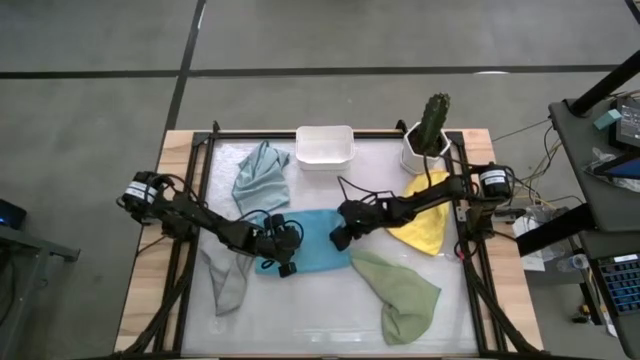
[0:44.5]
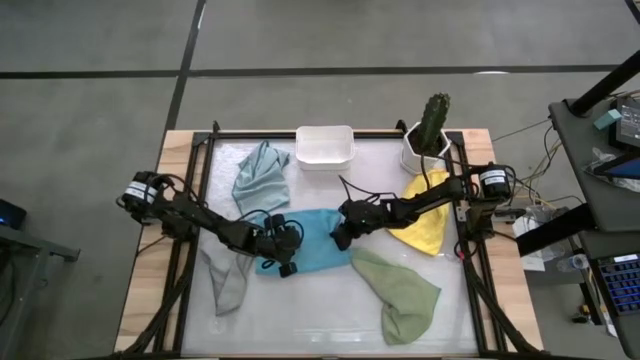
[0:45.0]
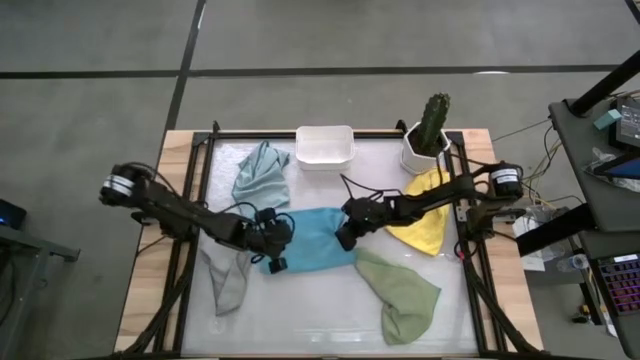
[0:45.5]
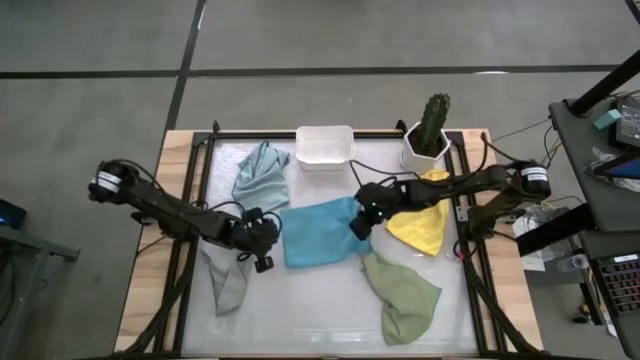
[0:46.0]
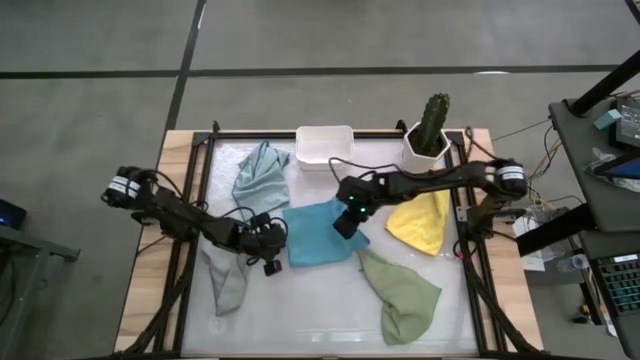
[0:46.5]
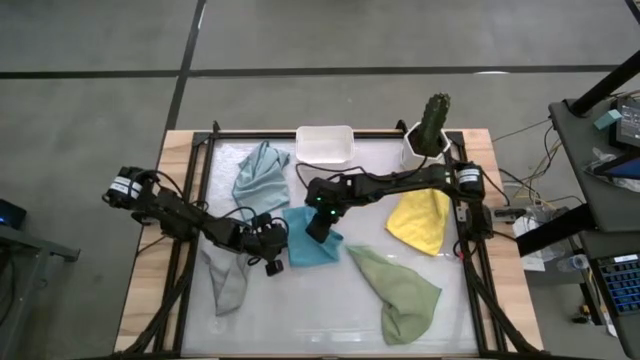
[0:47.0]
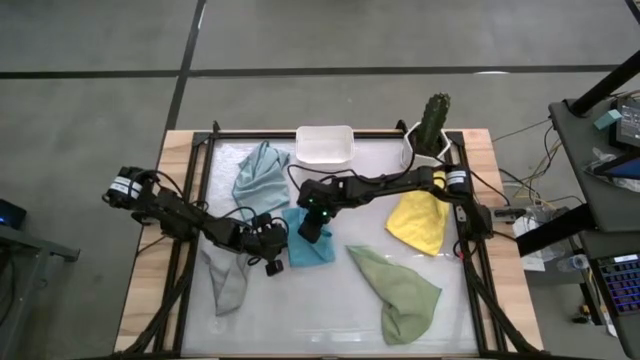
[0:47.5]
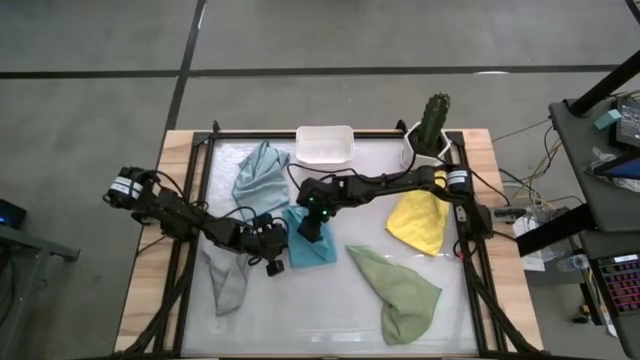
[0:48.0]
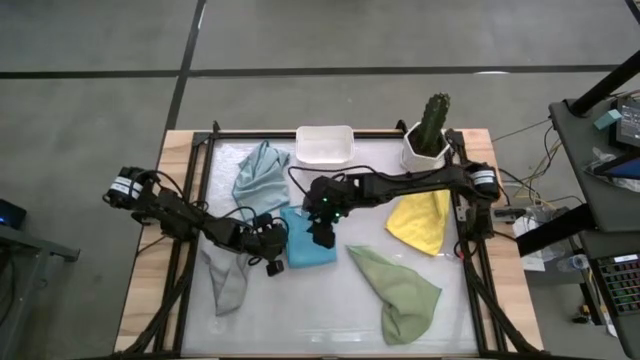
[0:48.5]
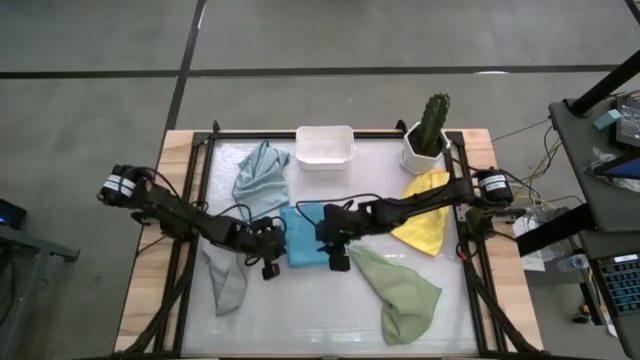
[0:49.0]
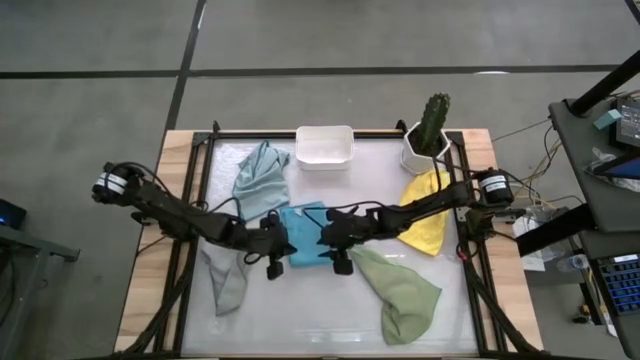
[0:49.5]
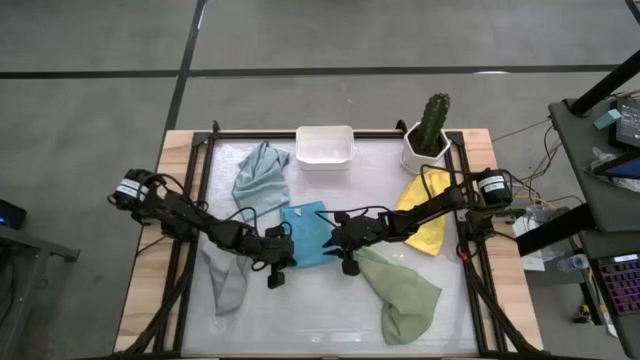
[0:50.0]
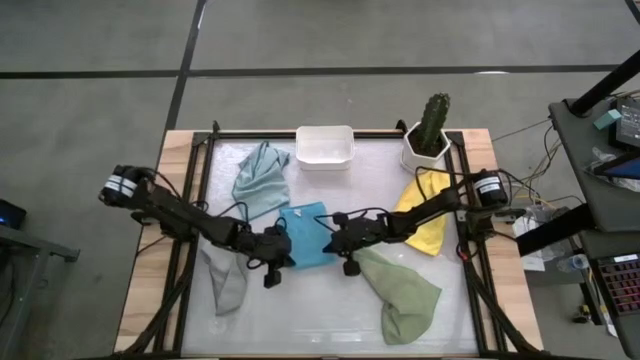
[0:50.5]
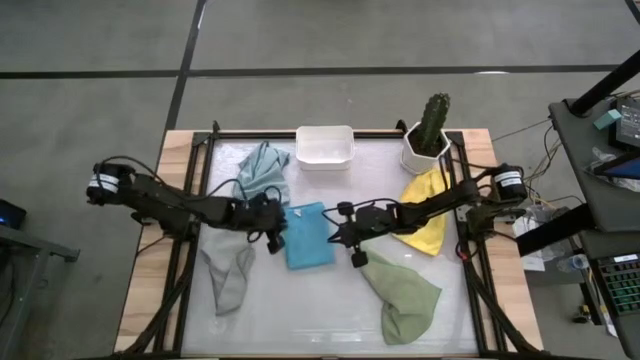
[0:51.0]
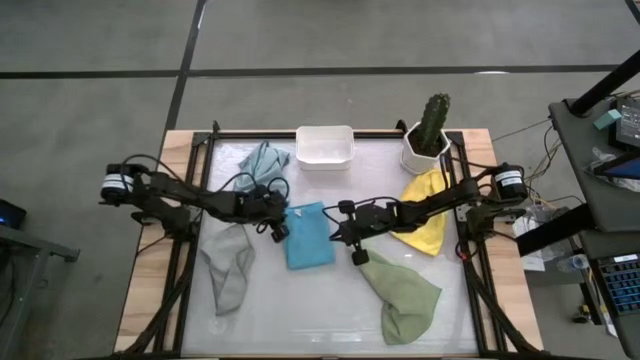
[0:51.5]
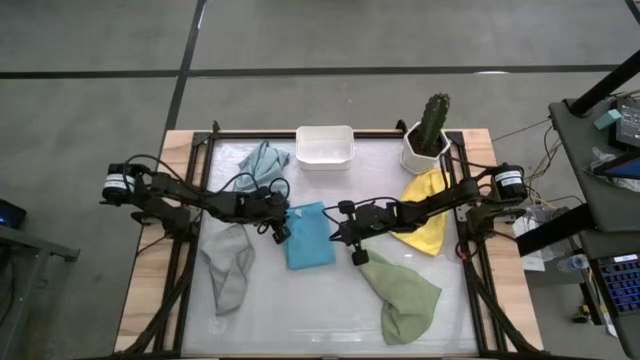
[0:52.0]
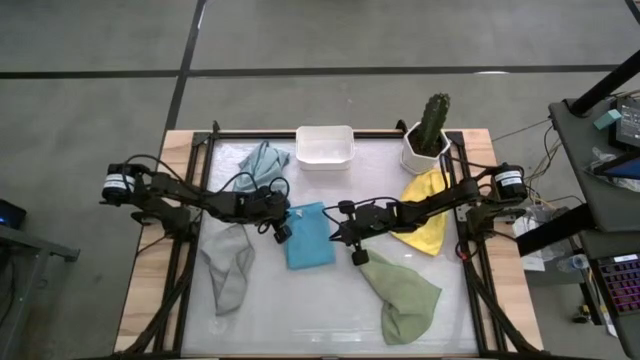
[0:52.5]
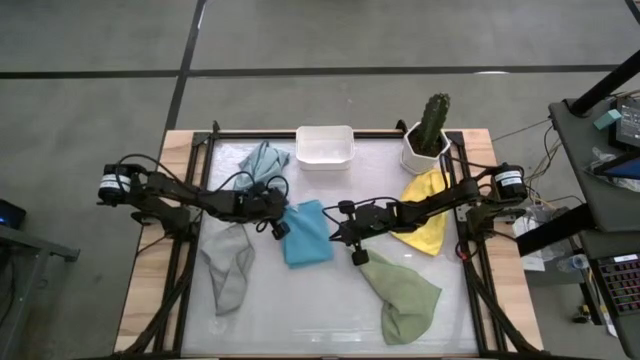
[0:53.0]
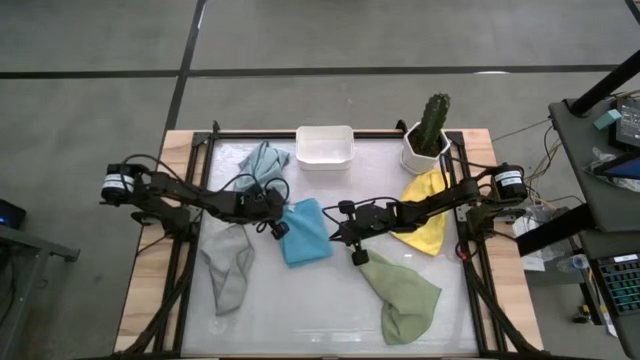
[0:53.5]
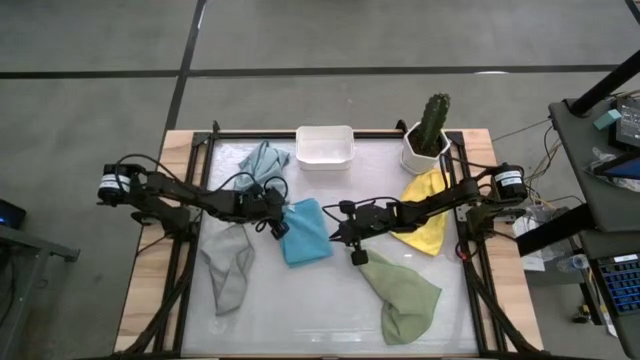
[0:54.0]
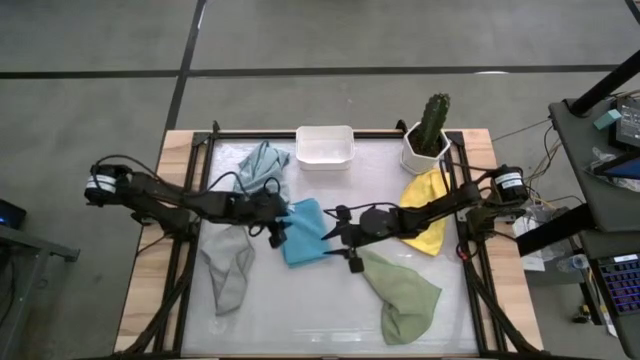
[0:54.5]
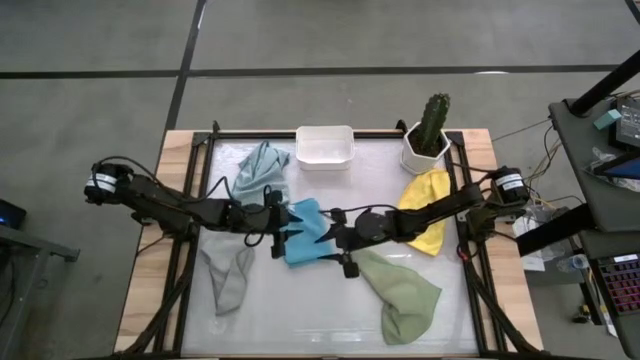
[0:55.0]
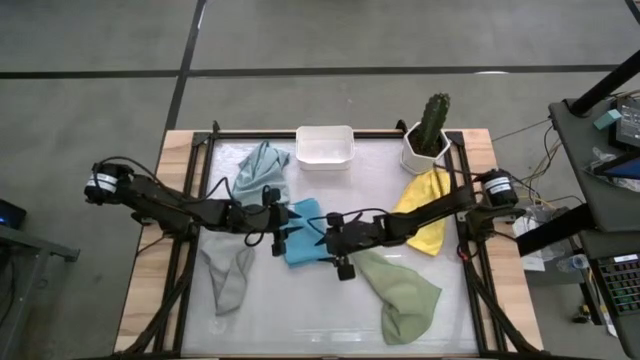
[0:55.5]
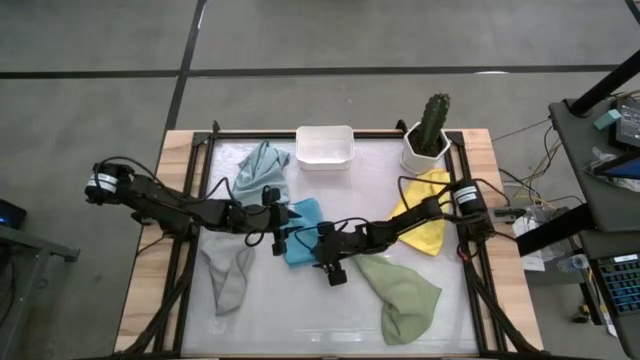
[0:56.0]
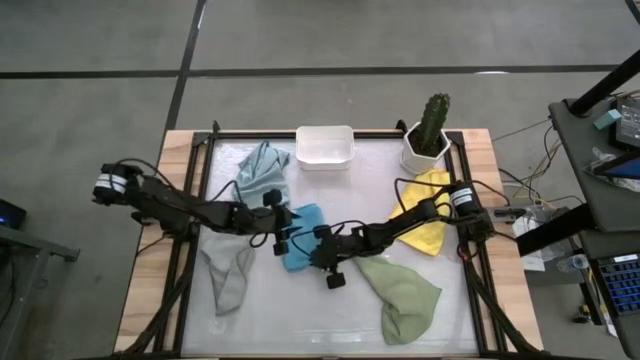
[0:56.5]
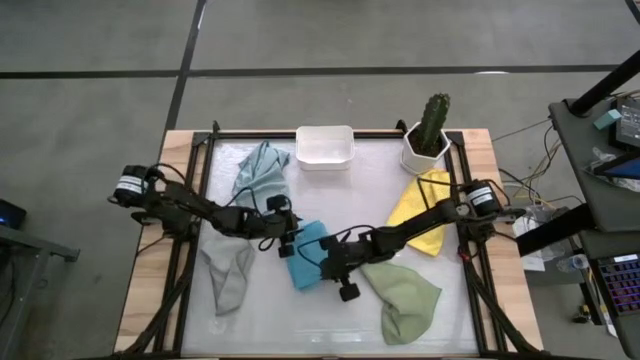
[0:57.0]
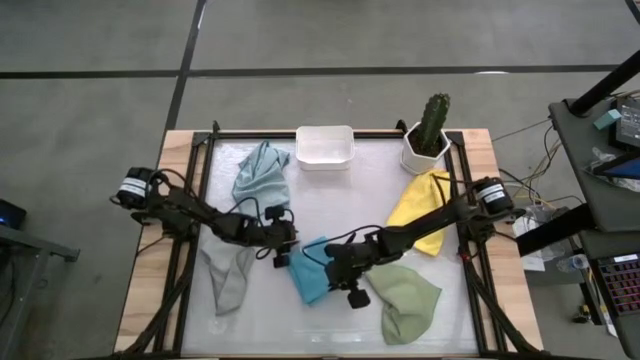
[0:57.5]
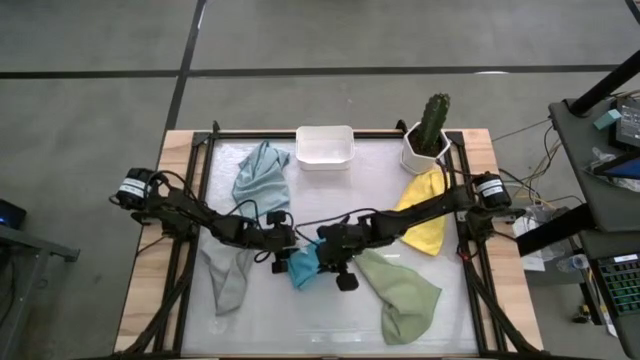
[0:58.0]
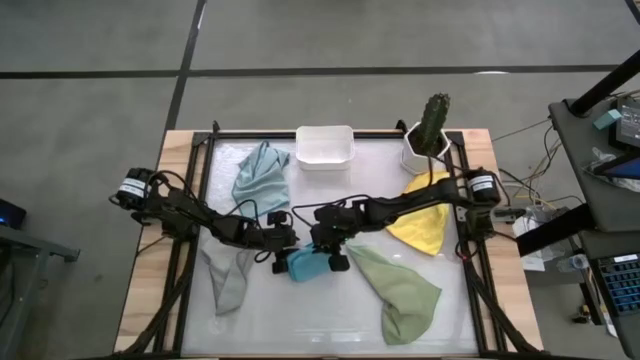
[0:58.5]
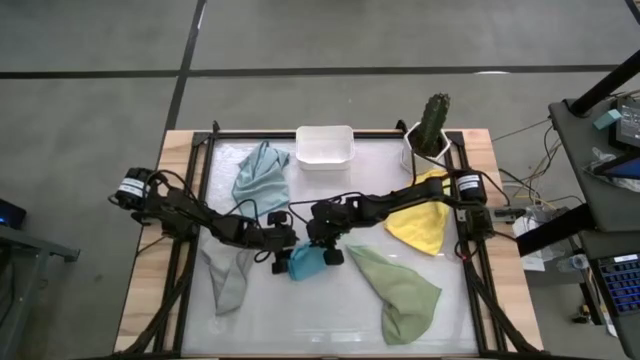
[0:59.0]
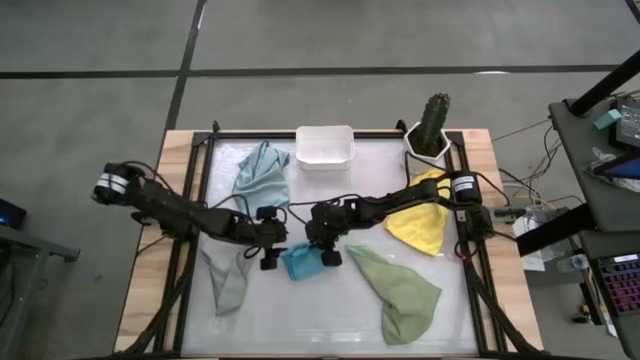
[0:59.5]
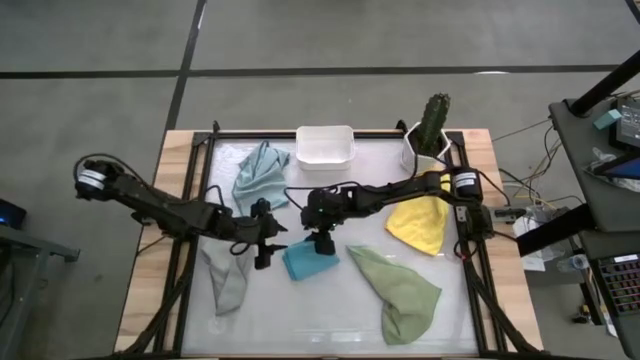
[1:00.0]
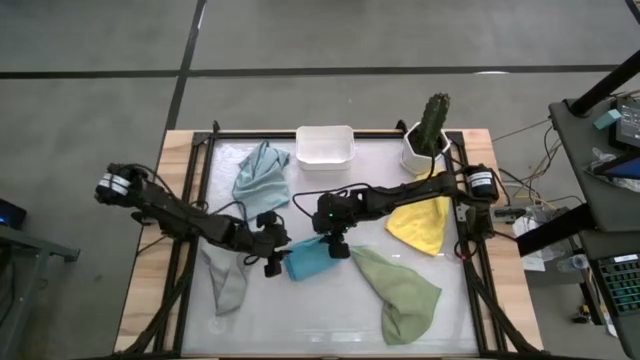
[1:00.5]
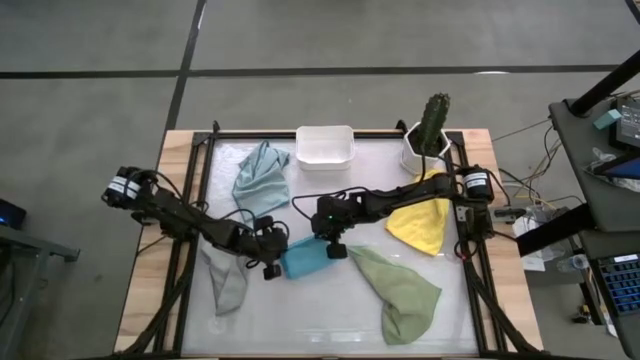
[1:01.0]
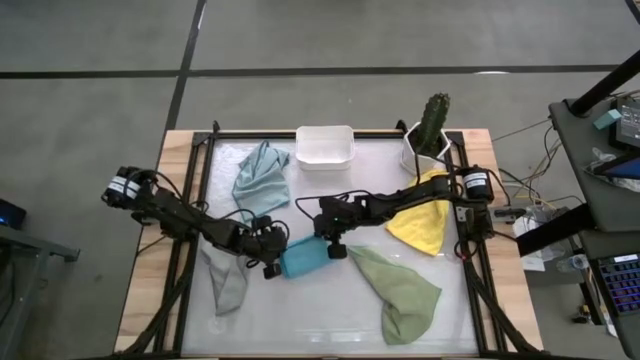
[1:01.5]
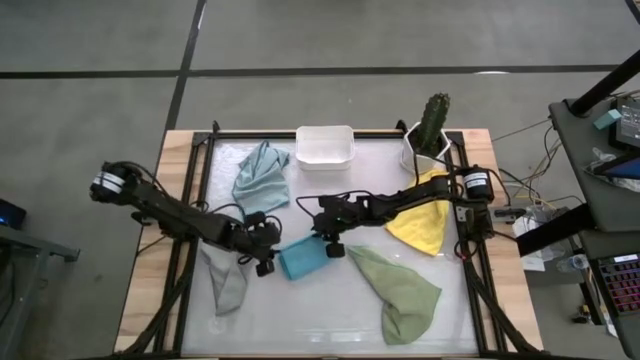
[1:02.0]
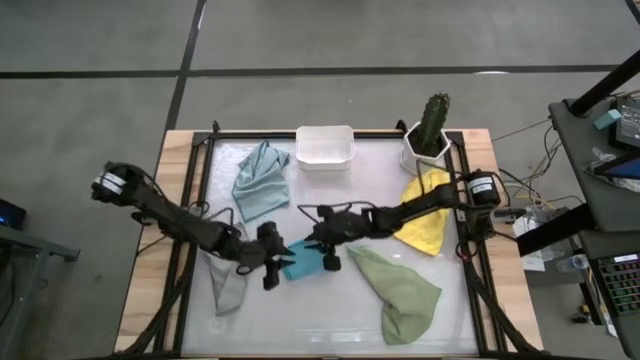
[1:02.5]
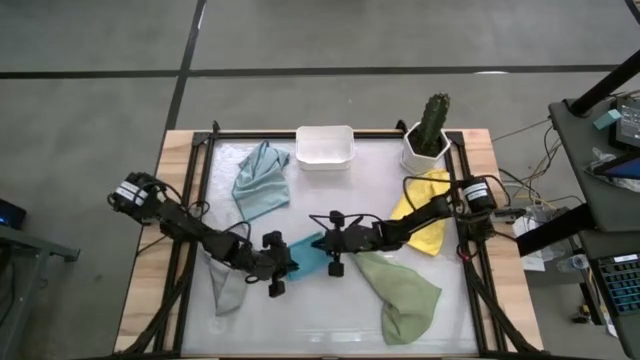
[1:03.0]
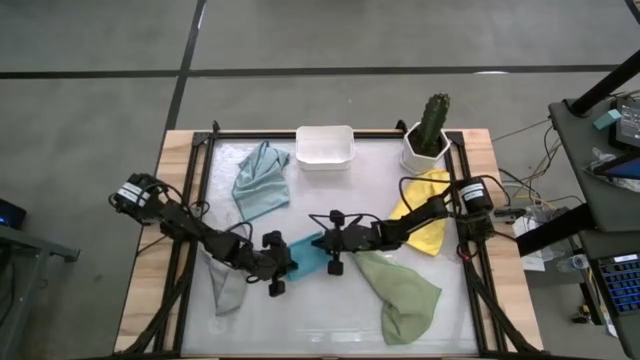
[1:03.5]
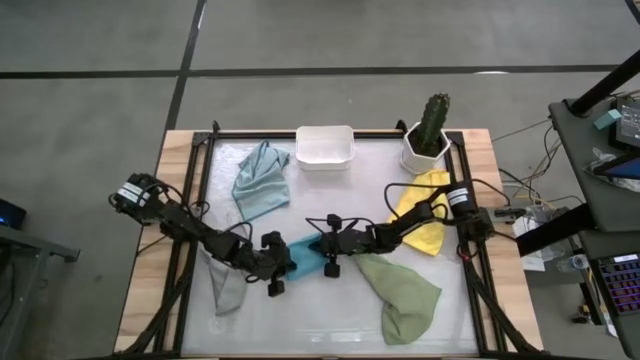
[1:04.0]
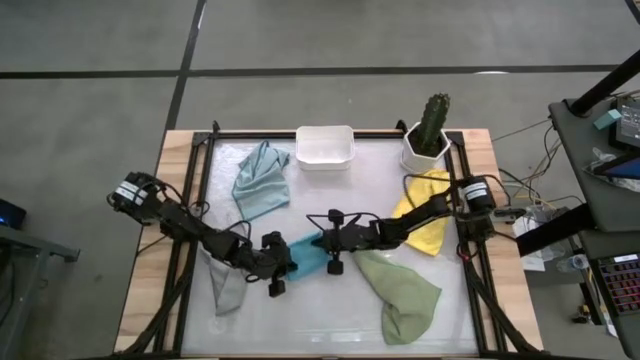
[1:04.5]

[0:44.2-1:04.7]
Task: Fold microfiber towels
Fold the blue cloth
